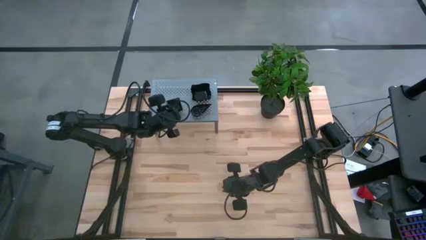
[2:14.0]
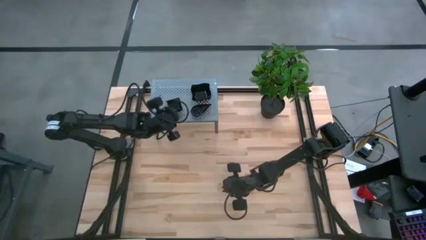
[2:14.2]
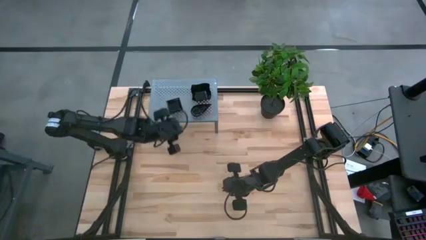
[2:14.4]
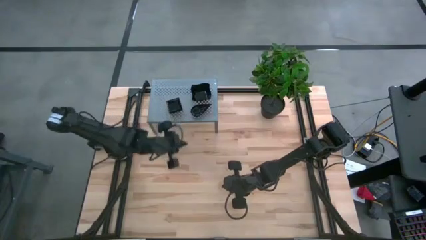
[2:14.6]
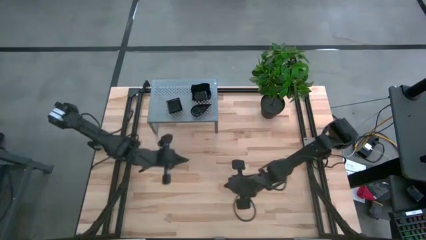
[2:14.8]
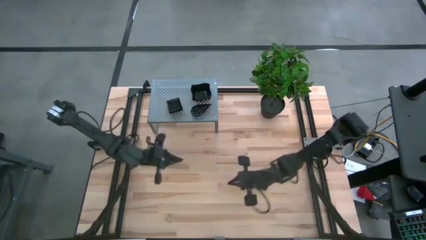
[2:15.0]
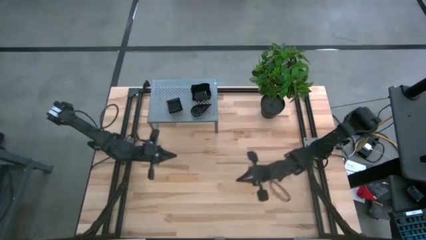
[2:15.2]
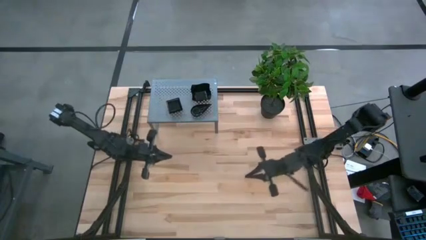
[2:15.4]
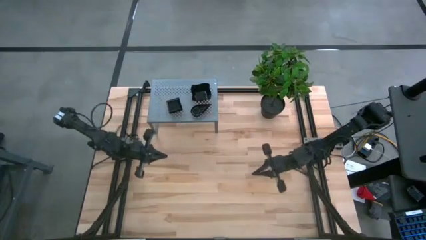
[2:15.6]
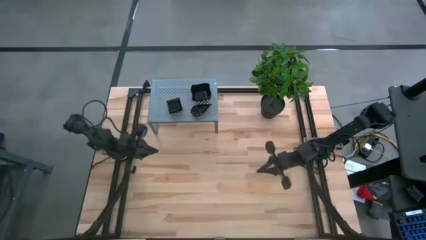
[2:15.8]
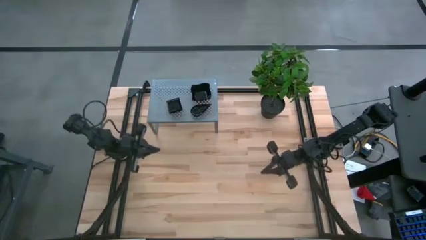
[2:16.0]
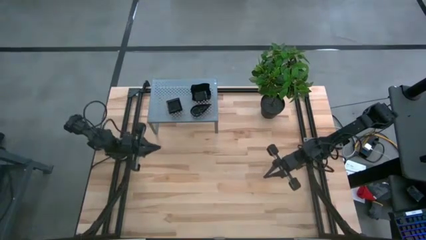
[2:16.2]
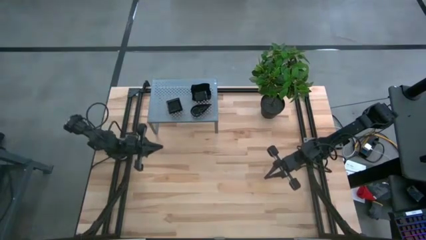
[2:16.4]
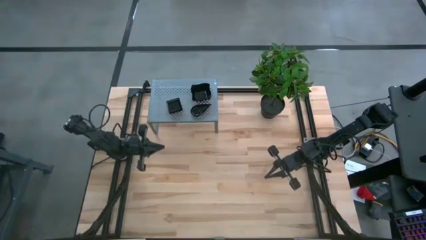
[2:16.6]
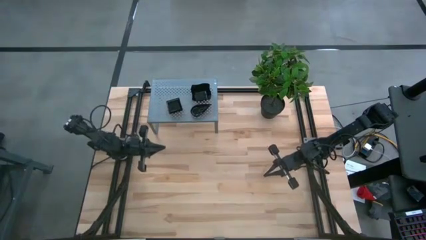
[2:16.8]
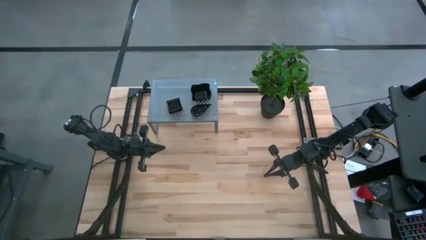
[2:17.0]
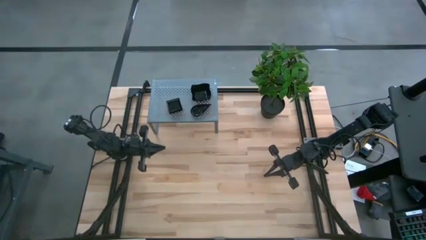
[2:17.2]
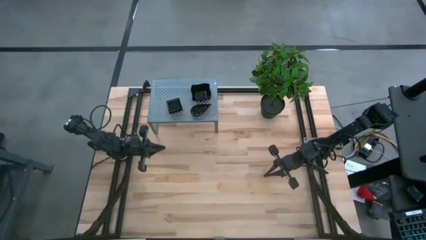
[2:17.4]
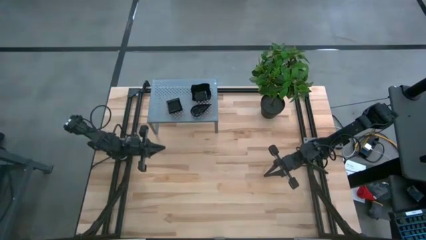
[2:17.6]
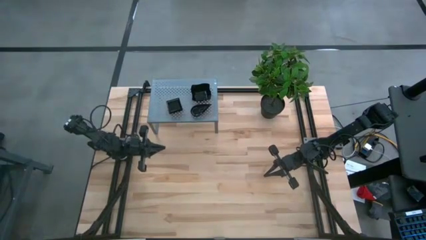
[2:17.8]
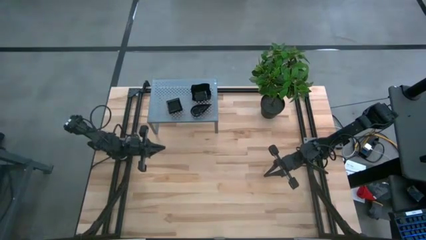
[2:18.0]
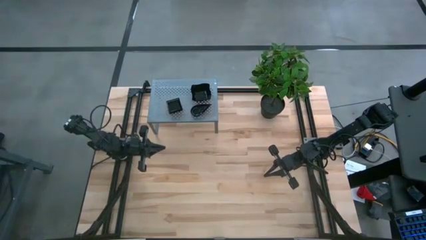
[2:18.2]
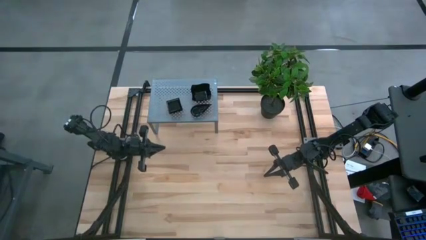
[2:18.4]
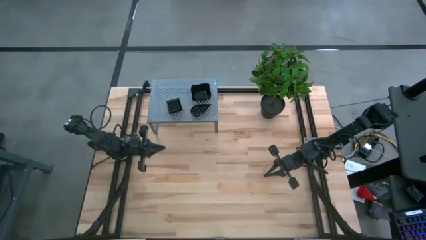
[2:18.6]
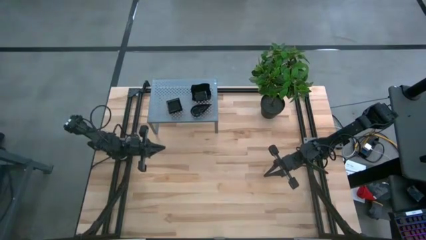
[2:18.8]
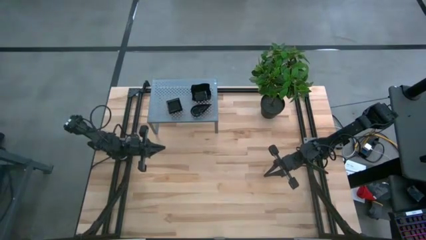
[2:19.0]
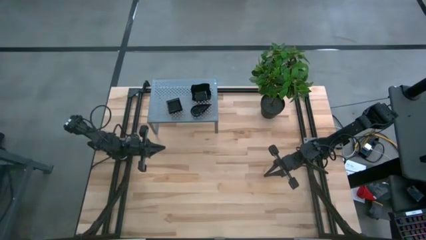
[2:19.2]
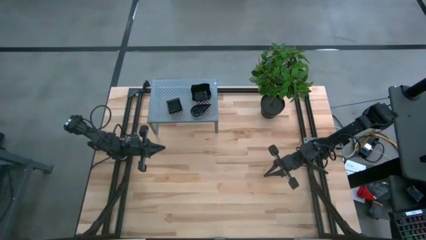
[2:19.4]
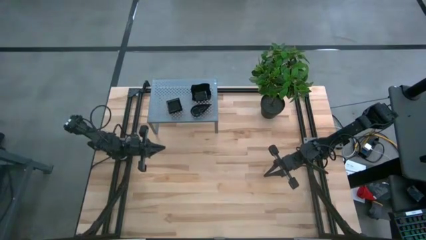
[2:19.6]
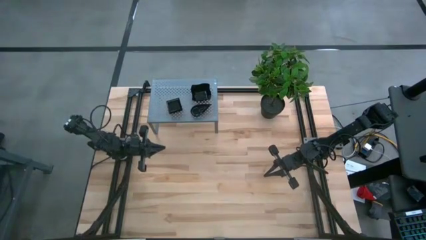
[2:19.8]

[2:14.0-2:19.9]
Task: Pick & Place Mini shaped plates
Return to Home Position

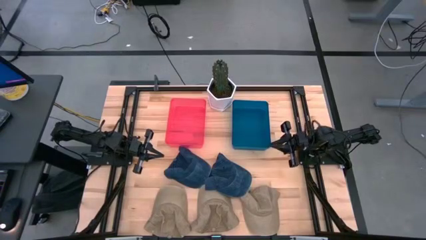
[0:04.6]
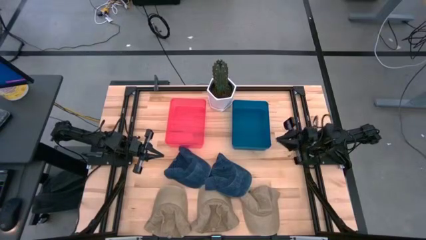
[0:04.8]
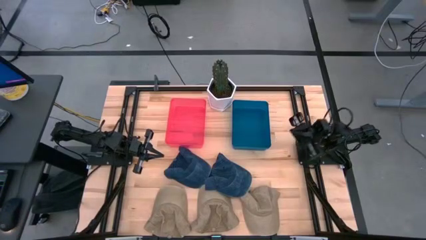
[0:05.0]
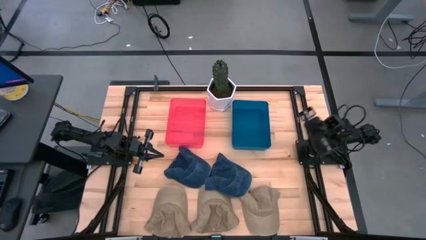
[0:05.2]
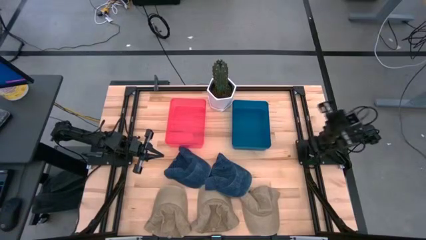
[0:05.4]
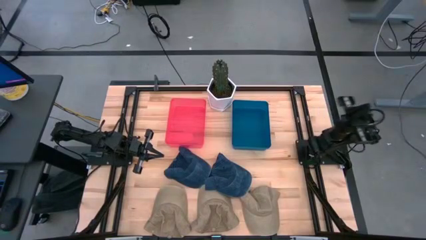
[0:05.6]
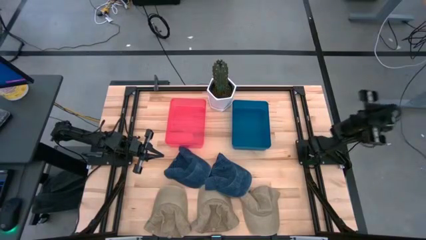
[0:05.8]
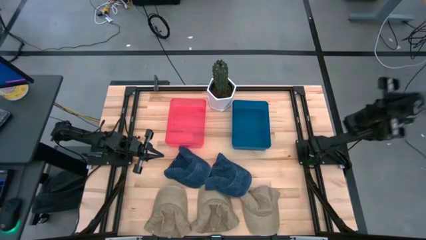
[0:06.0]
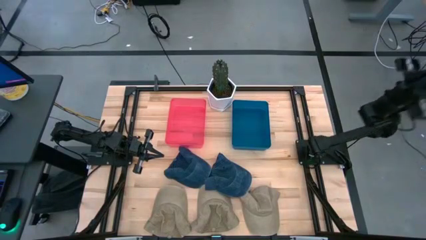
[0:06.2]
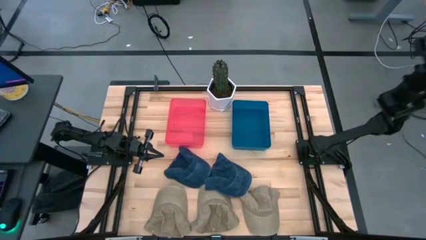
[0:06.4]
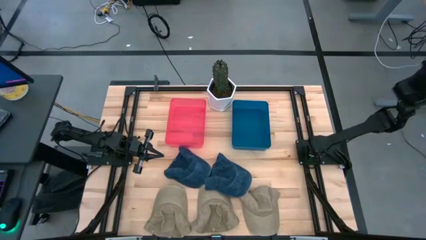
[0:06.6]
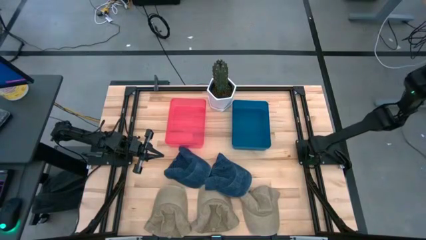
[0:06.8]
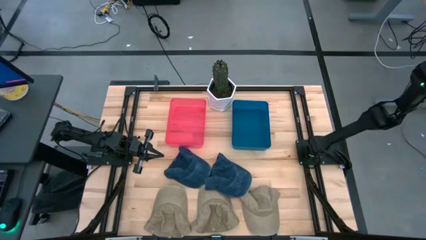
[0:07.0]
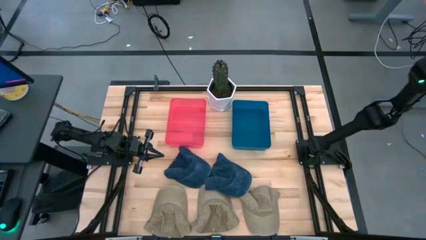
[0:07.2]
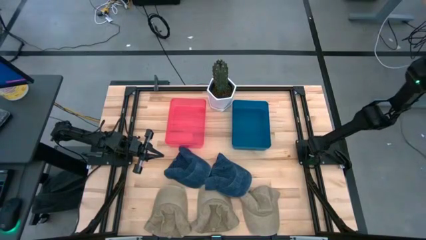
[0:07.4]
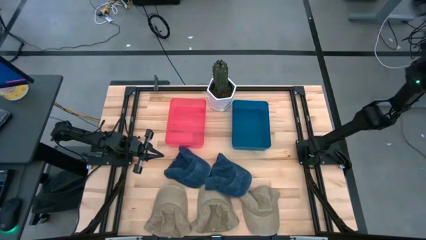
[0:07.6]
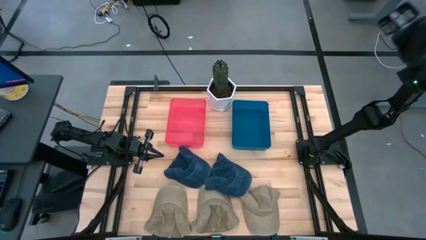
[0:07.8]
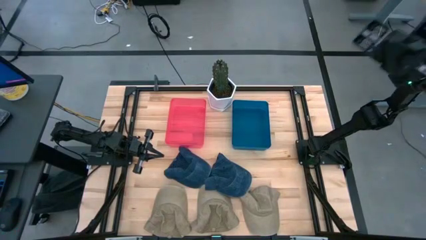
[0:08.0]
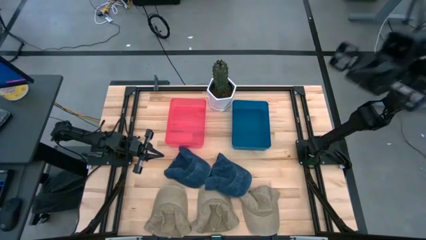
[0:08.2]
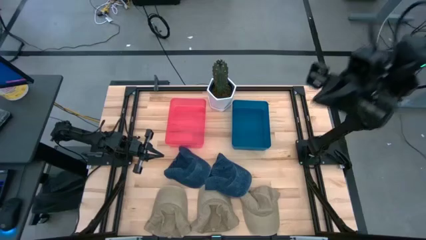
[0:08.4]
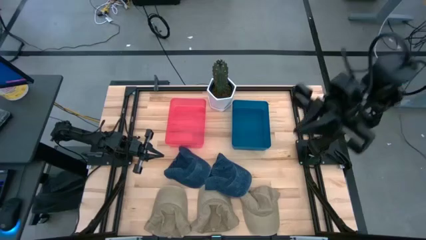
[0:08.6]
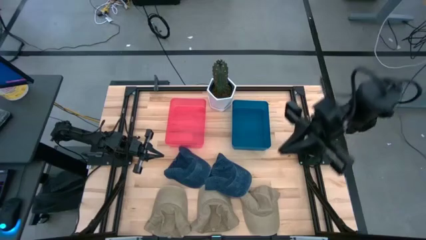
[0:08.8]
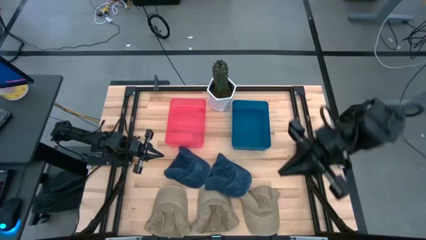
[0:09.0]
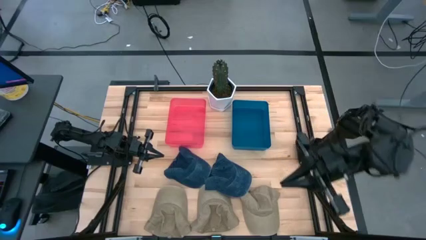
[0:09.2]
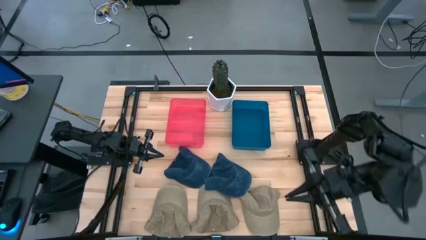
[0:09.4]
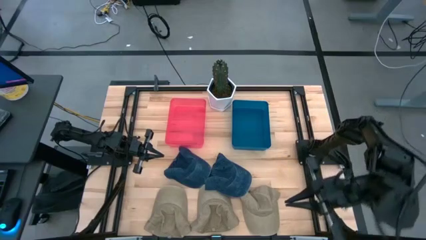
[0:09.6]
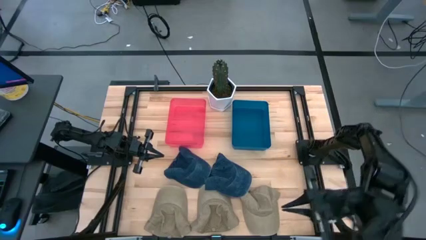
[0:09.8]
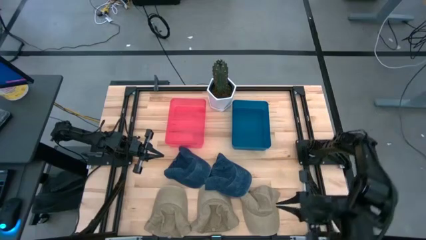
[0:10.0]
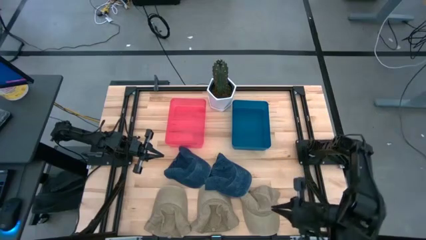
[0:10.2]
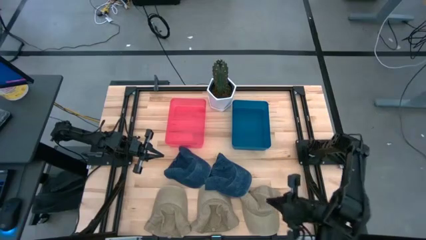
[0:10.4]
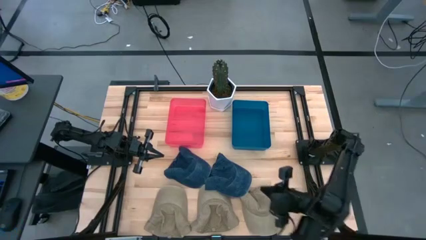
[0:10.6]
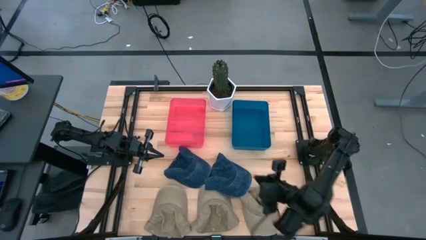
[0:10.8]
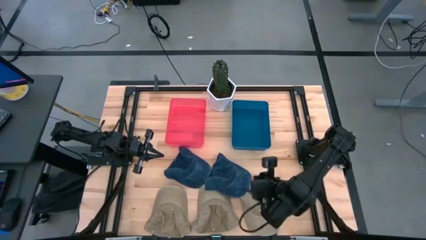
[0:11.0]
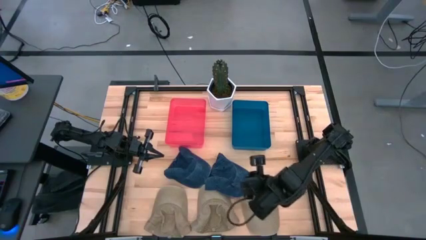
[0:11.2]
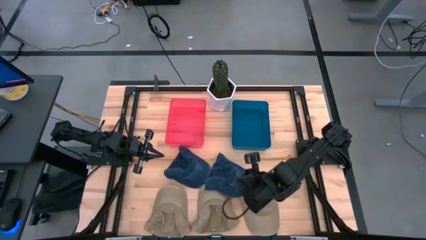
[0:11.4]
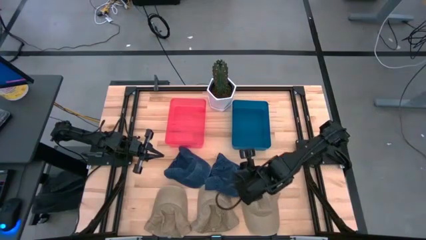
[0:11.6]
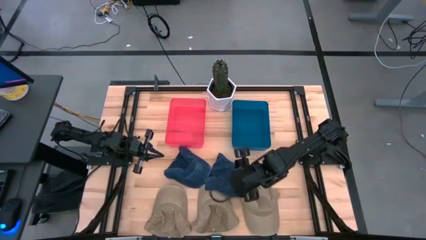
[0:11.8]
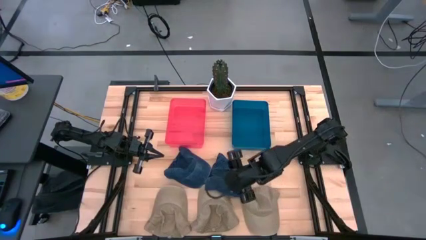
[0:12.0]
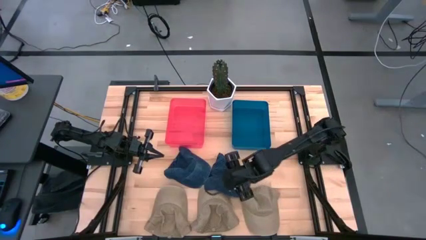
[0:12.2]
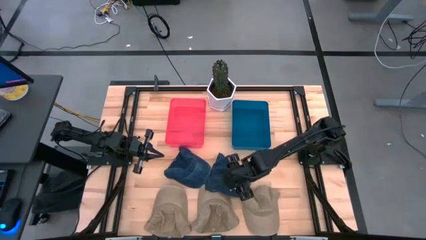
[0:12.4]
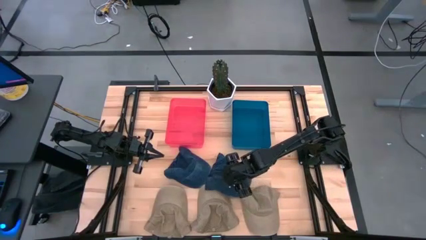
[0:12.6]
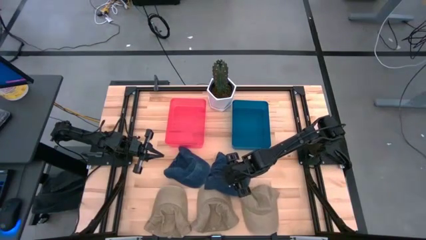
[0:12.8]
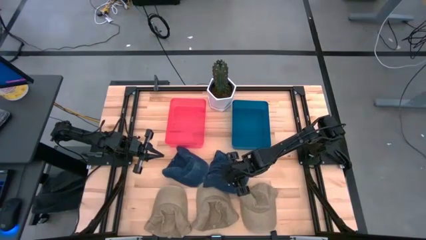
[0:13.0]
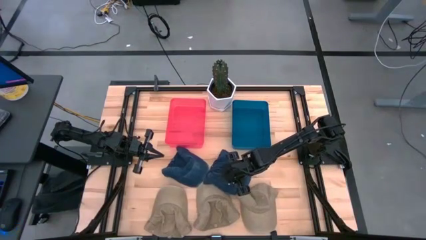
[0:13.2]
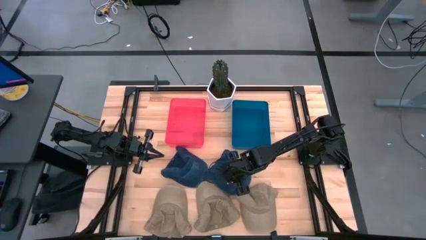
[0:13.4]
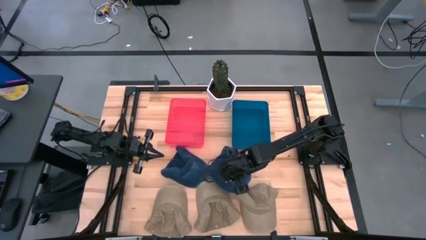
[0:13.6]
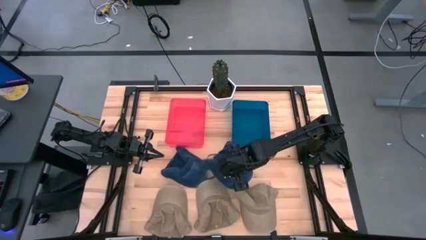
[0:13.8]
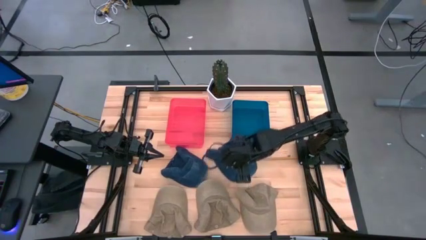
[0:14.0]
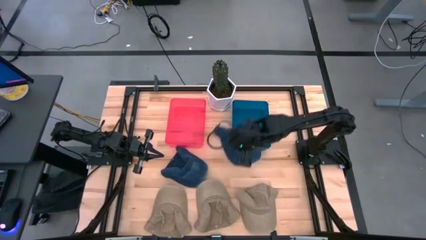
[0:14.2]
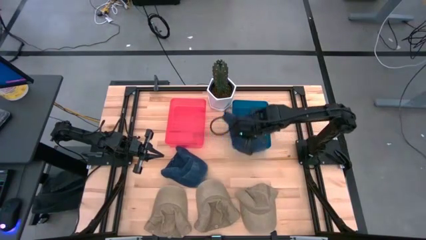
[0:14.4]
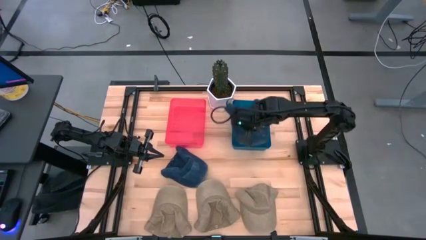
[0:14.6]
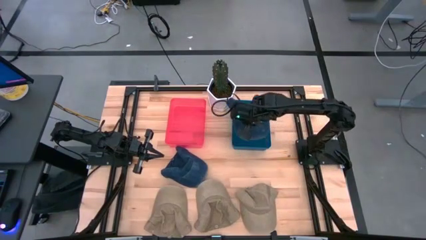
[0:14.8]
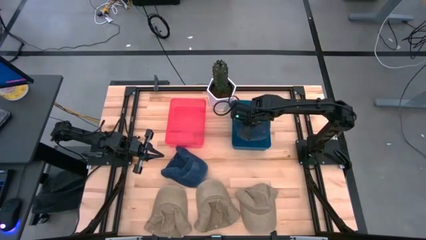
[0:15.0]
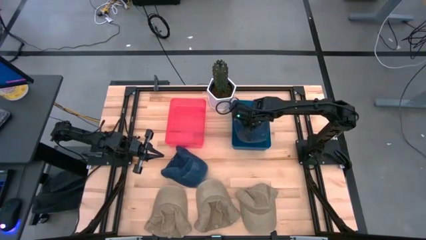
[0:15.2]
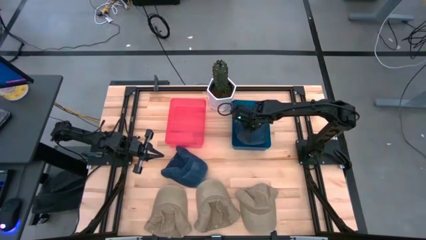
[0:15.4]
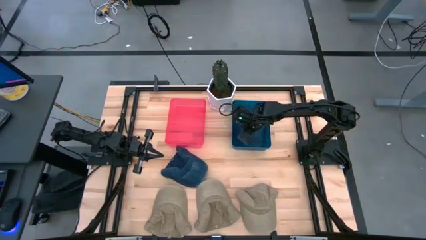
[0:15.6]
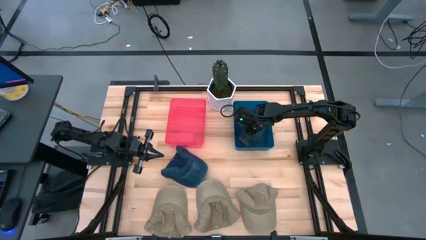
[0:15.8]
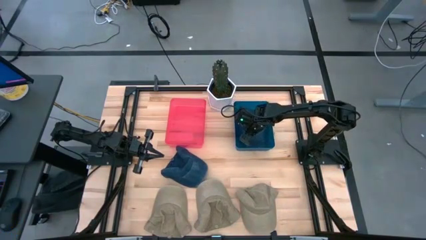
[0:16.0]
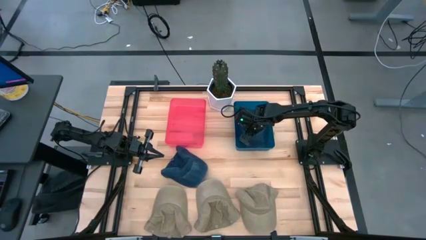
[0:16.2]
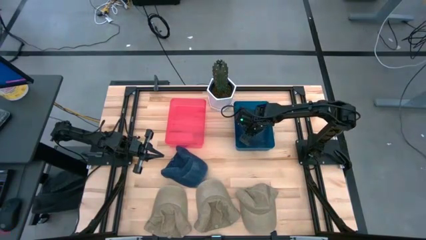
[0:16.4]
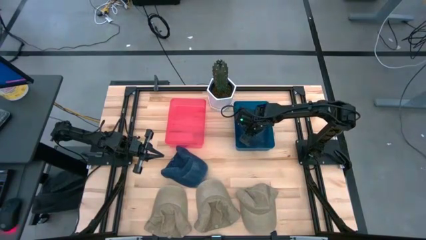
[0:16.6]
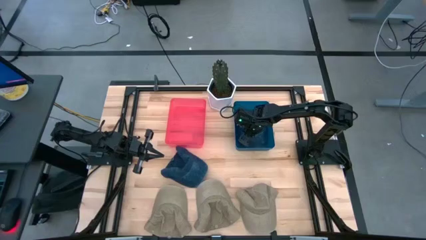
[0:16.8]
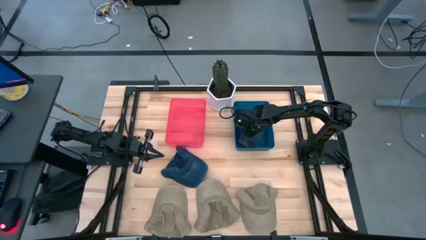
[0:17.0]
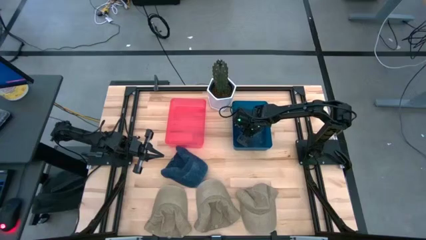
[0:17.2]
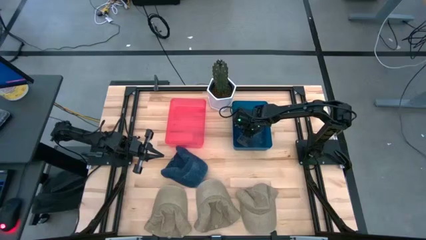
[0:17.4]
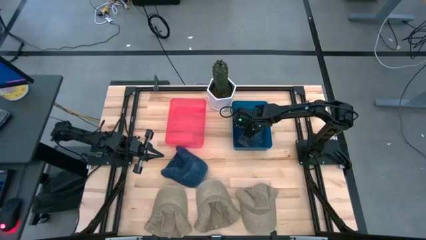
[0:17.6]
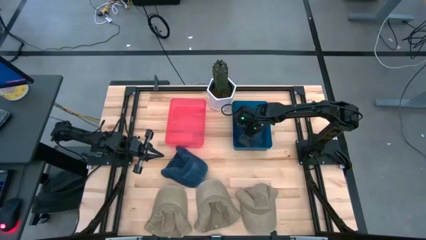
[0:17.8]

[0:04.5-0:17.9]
Task: Pick & Place hat
Put the right blue cap into the blue bin
